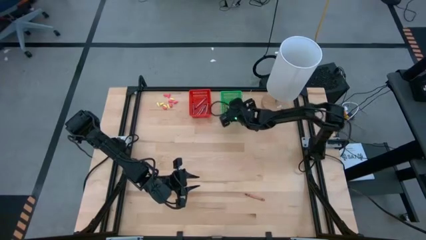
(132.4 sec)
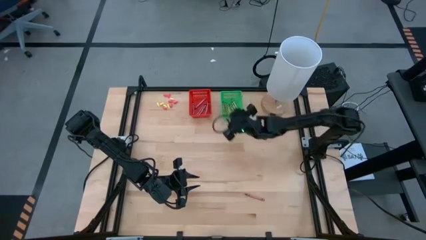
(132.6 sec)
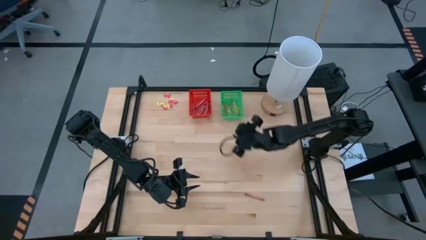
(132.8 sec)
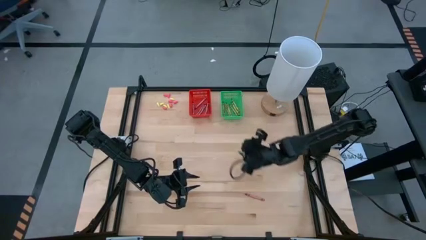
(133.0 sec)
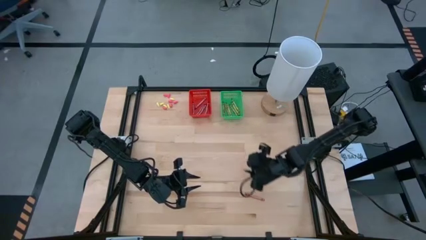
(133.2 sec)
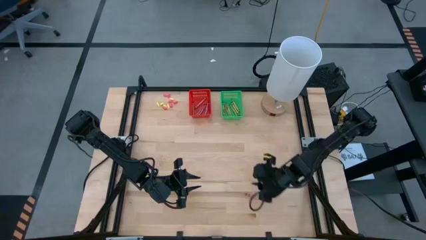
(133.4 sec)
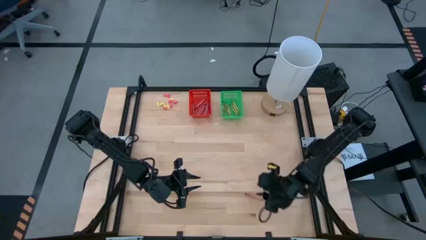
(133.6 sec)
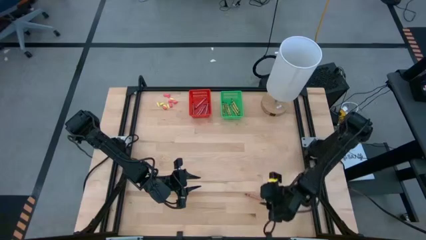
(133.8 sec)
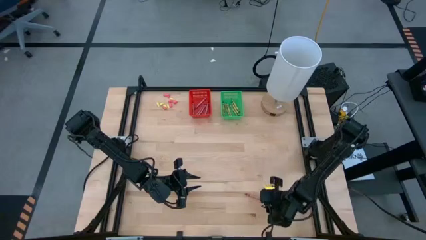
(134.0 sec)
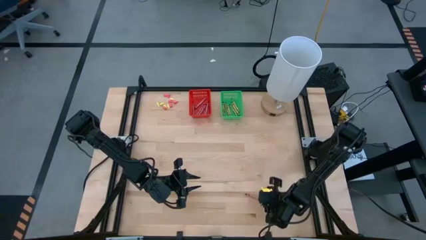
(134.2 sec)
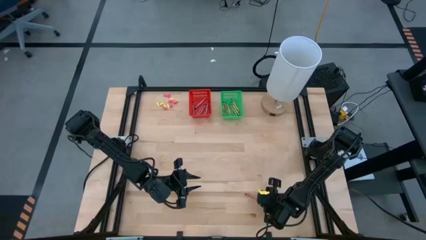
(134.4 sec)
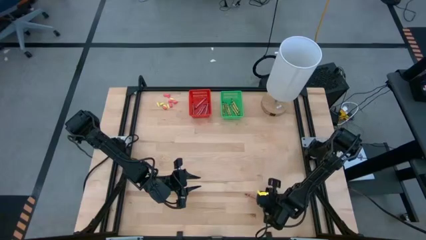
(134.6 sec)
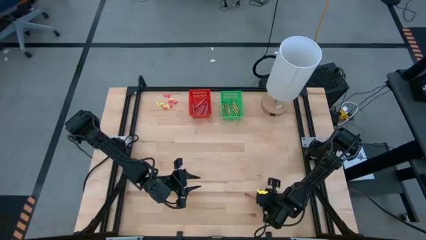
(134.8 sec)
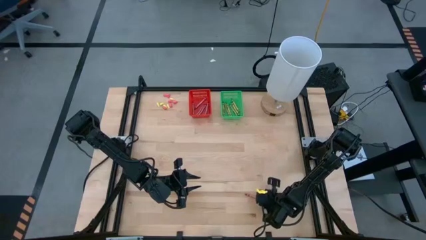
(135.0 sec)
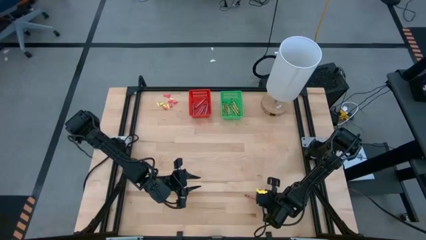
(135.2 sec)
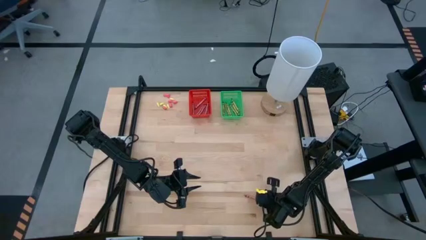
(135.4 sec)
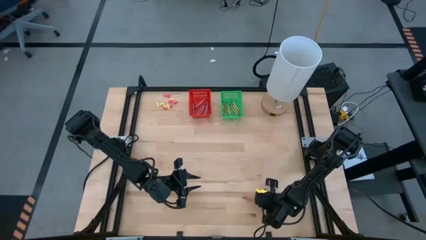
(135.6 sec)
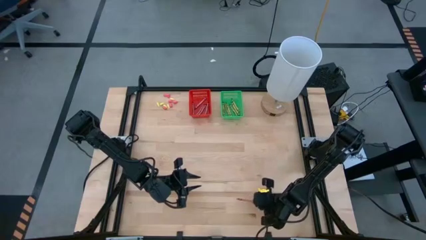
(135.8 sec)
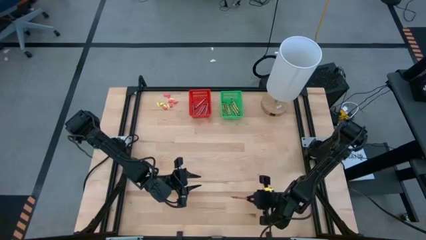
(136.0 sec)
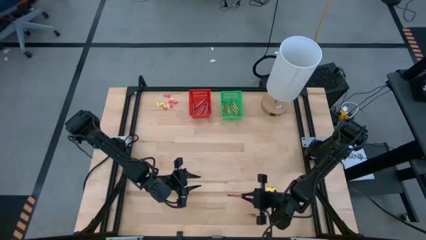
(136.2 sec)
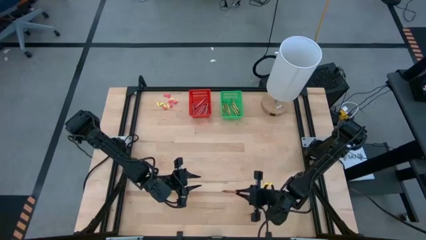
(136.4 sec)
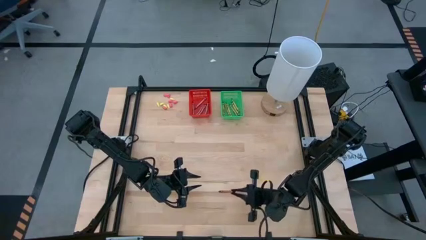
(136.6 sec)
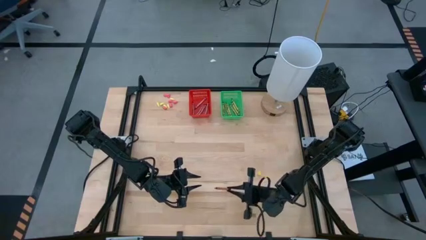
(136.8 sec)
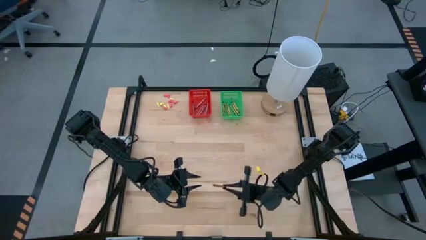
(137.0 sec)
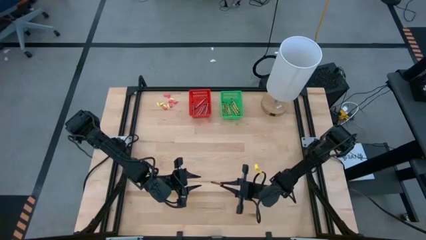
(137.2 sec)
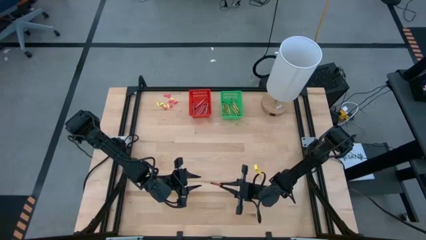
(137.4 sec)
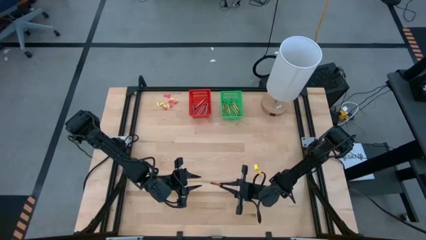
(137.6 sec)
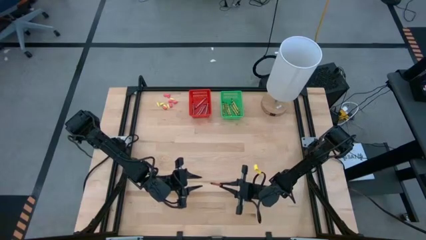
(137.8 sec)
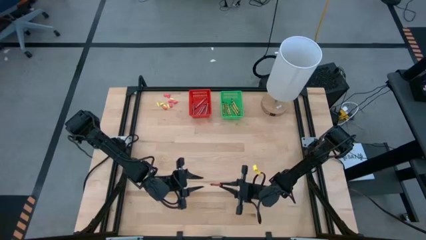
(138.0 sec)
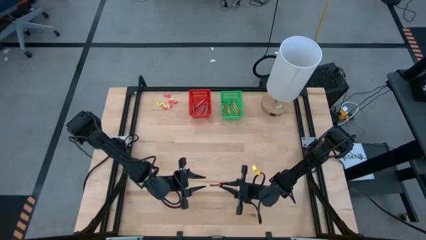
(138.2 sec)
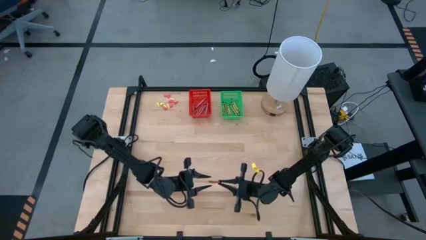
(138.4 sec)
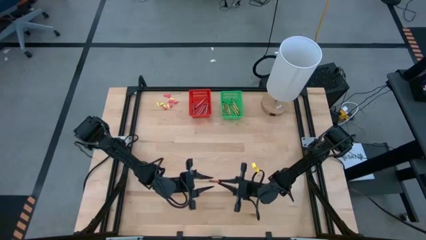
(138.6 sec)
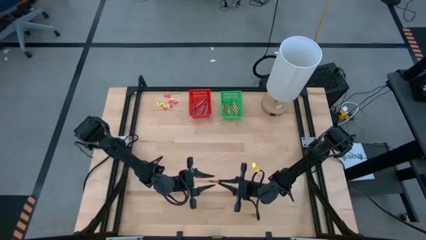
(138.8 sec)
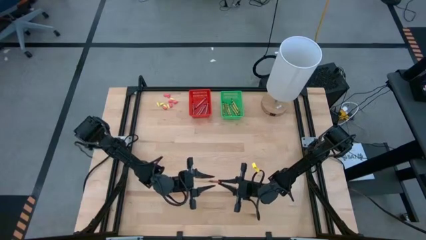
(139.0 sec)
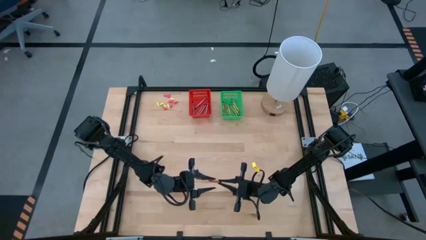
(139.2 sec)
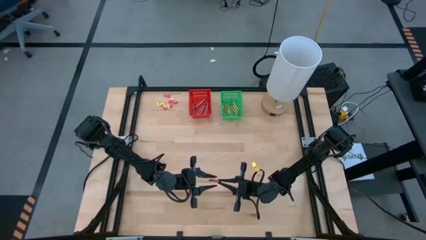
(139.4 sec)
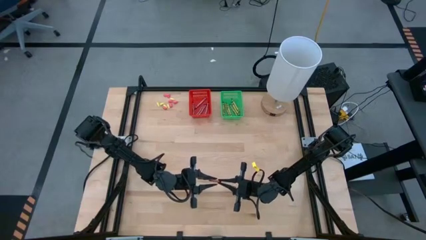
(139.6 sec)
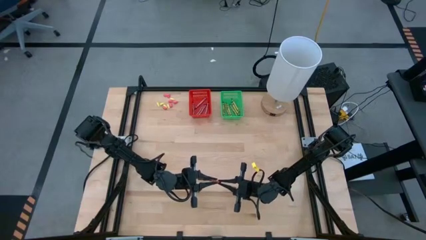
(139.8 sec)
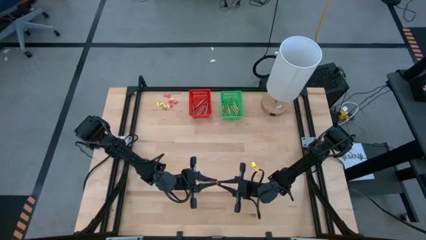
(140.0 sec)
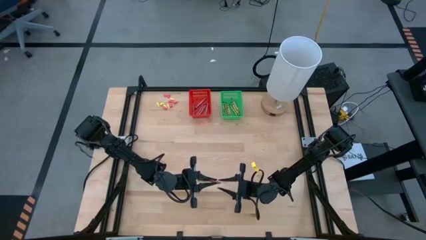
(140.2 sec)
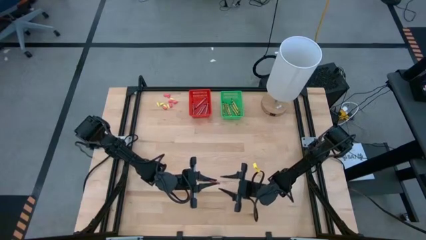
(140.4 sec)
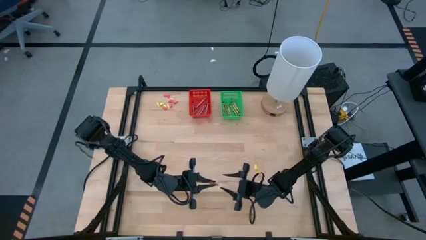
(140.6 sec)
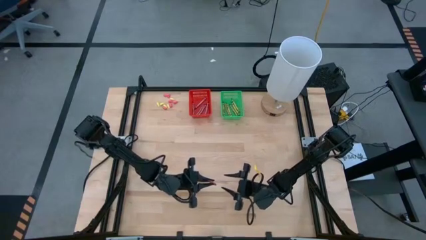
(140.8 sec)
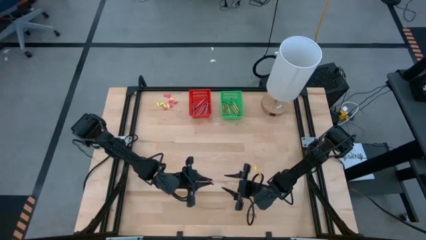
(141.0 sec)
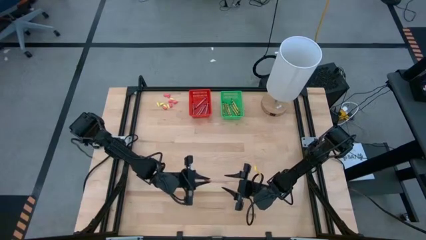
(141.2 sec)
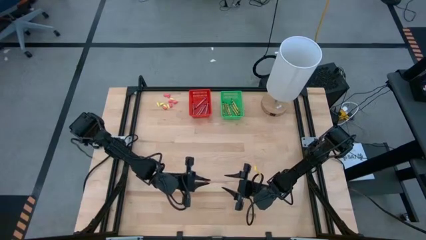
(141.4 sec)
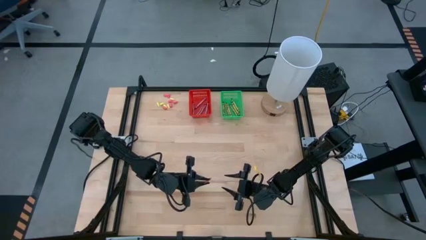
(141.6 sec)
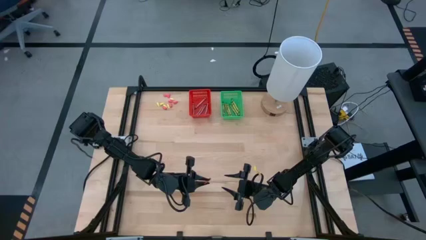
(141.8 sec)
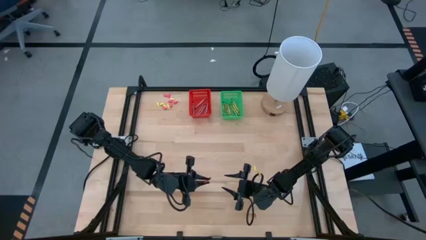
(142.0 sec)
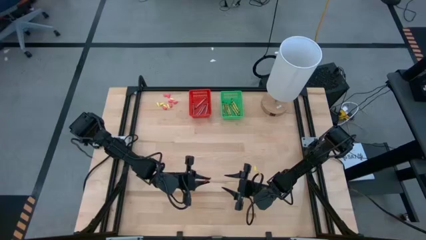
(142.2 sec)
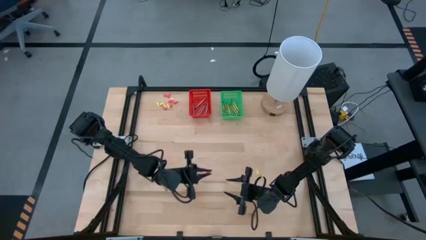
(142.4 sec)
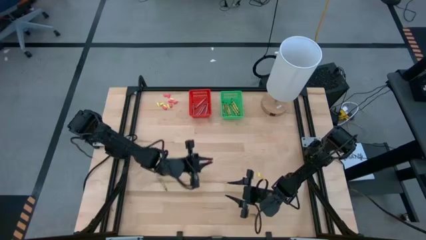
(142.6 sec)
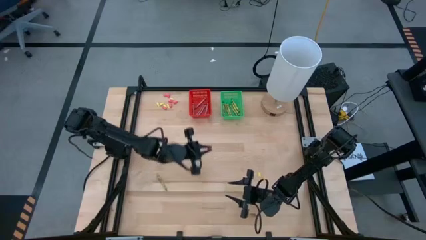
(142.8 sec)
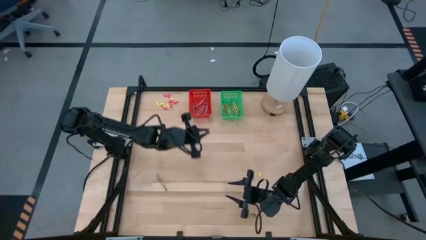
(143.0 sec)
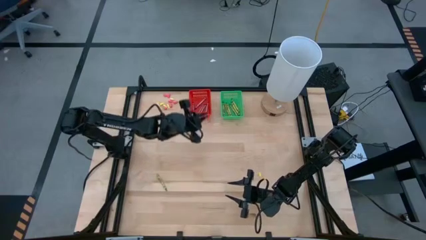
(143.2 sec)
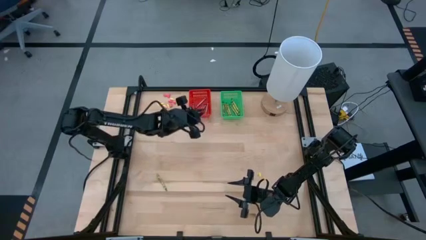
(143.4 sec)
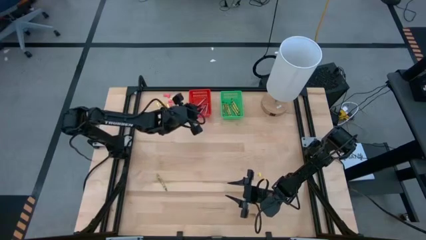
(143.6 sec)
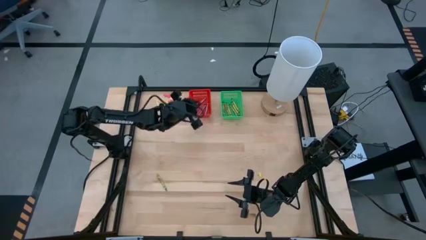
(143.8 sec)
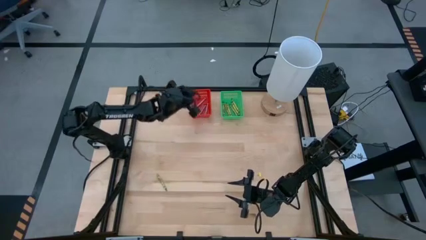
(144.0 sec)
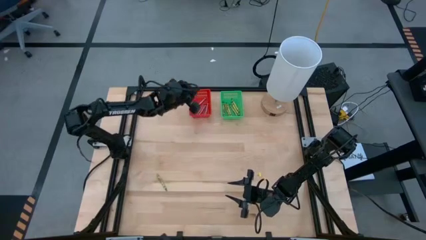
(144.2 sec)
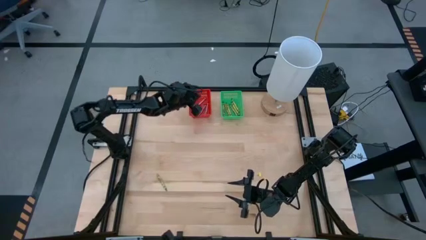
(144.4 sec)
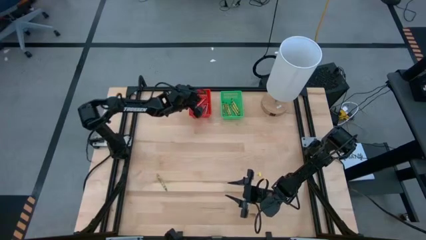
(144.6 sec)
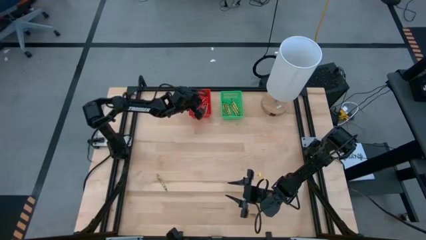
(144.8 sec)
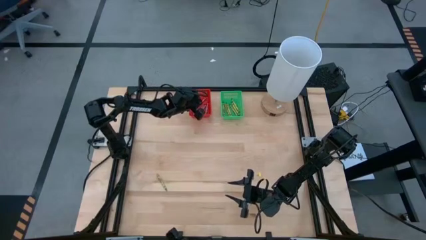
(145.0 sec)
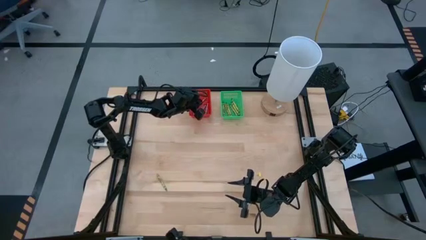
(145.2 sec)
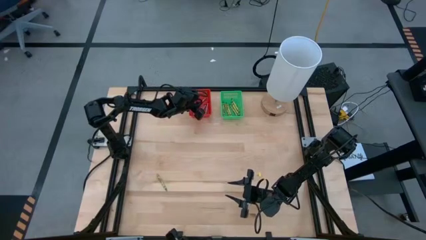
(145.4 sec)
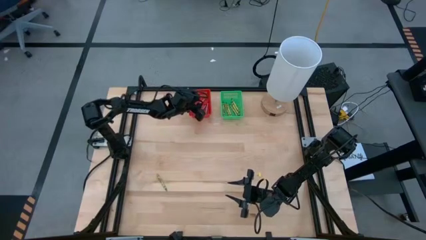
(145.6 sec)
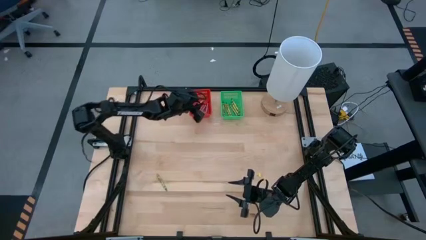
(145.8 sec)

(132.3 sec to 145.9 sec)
Task: Sort crayons
Put the red crayon into the red bin

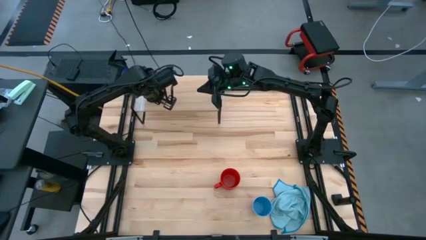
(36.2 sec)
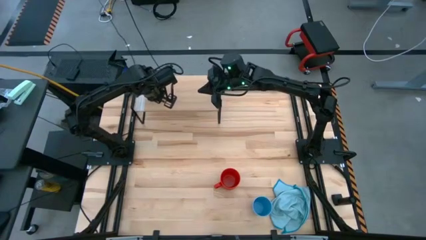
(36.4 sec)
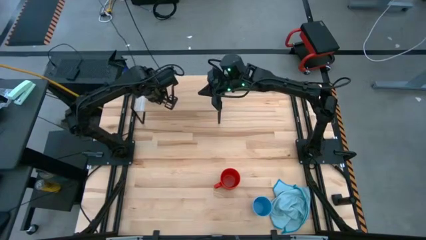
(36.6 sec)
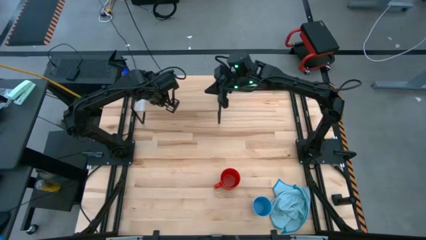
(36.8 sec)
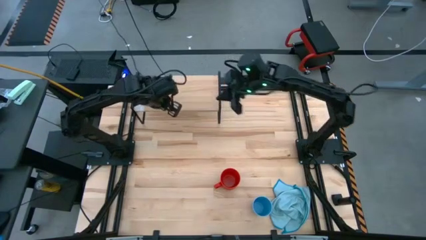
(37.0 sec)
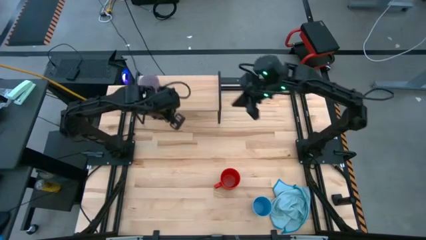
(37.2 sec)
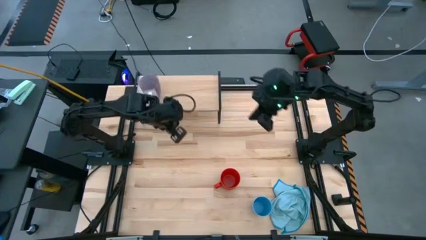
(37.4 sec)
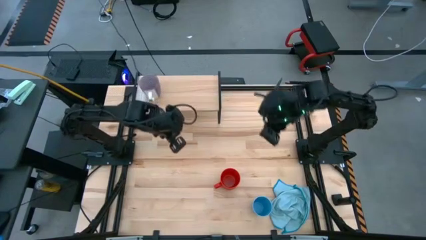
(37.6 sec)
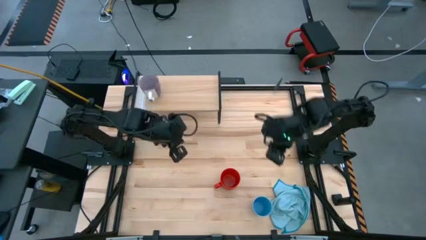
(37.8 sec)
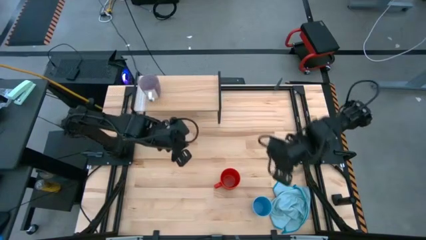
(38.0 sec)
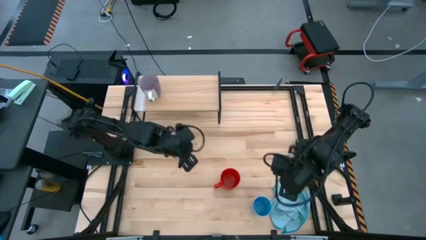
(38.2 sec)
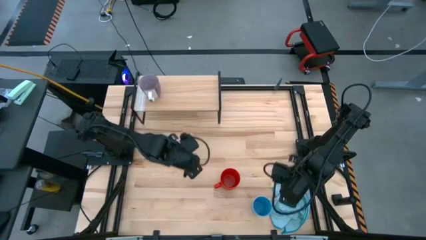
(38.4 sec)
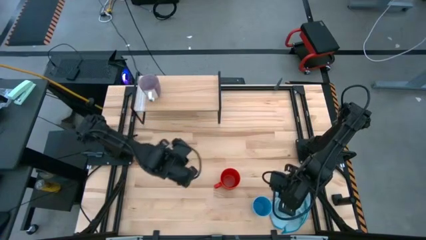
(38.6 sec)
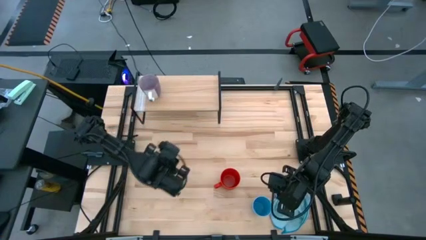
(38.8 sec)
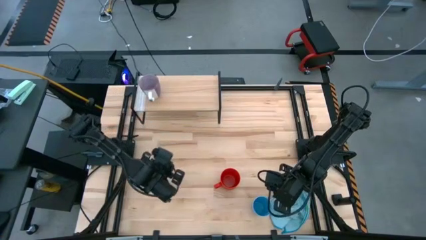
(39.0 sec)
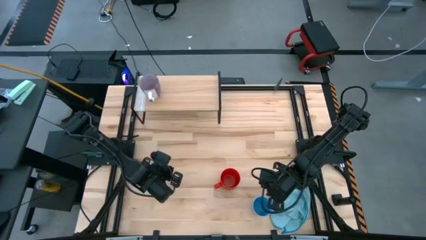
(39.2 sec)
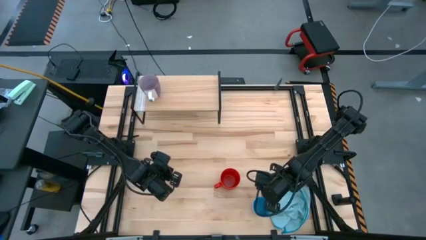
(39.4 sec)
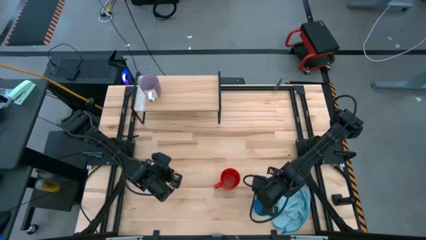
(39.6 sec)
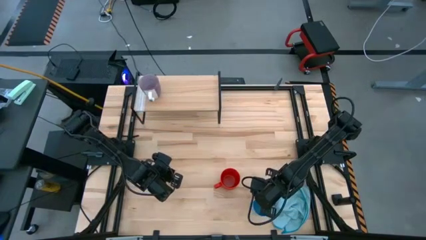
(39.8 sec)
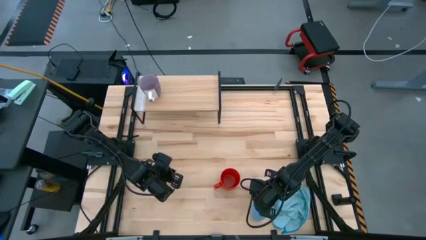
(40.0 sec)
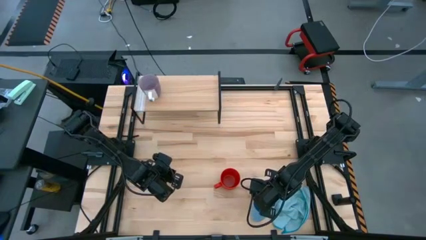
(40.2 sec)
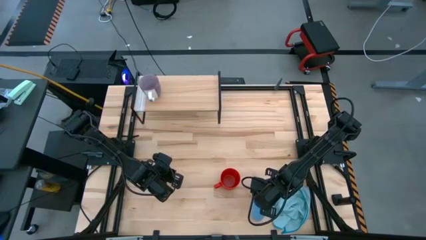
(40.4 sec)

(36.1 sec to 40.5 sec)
Task: Stack small to large cups/mugs on shelf
Put the blue cup on the shelf
